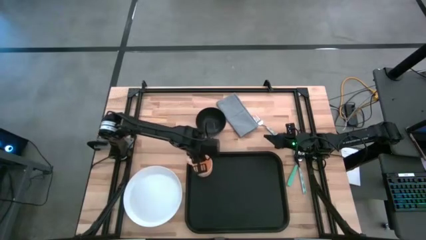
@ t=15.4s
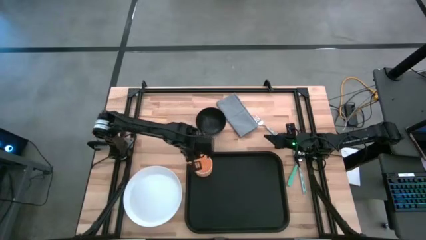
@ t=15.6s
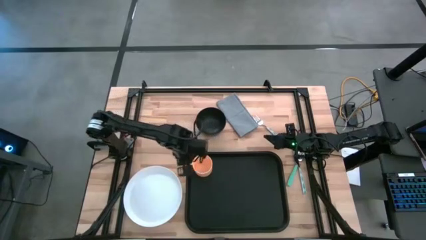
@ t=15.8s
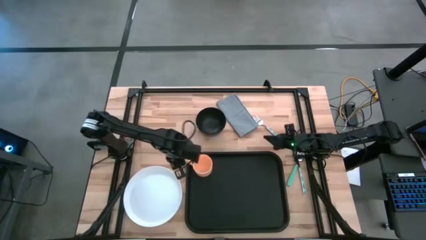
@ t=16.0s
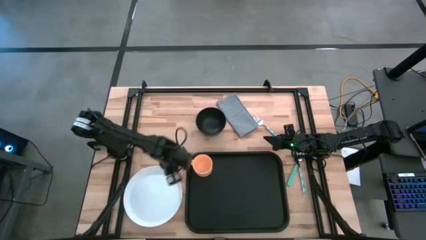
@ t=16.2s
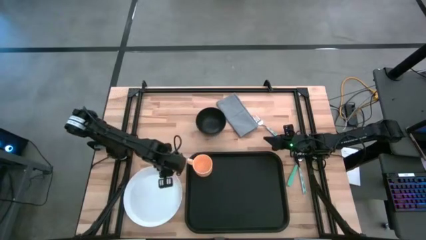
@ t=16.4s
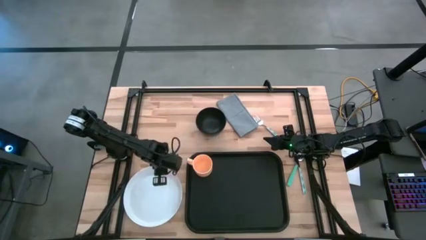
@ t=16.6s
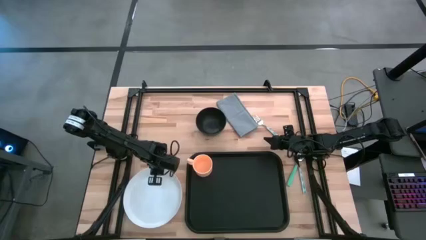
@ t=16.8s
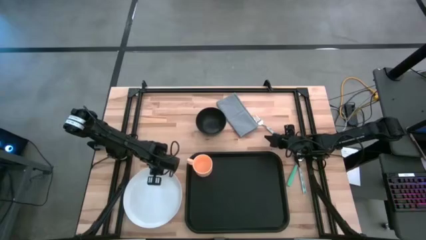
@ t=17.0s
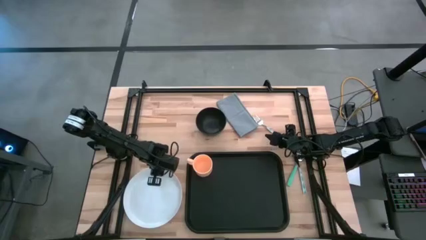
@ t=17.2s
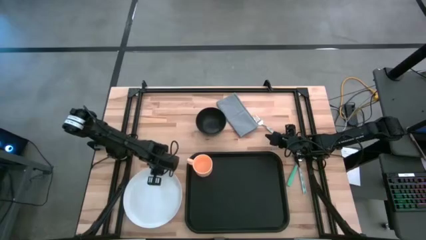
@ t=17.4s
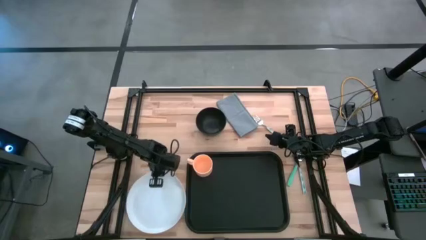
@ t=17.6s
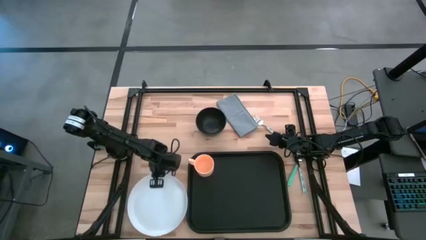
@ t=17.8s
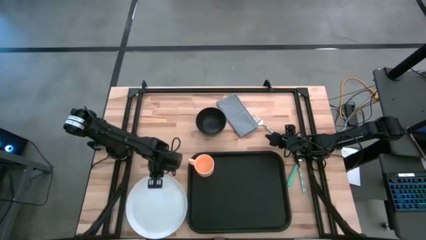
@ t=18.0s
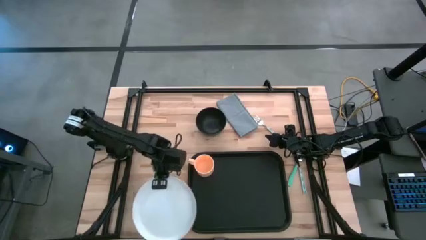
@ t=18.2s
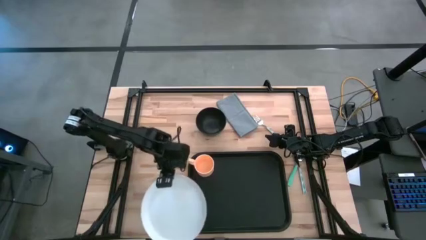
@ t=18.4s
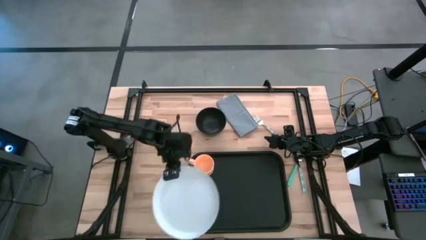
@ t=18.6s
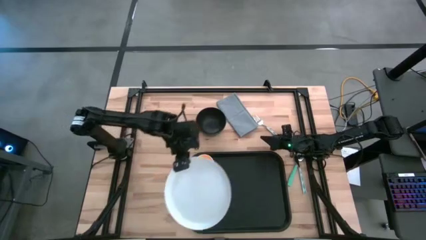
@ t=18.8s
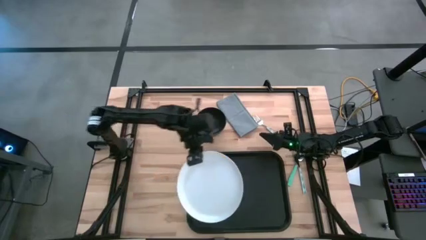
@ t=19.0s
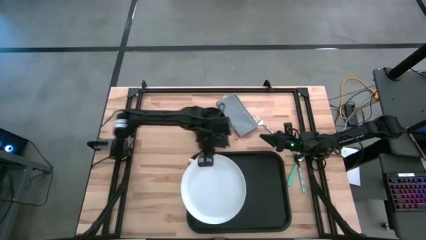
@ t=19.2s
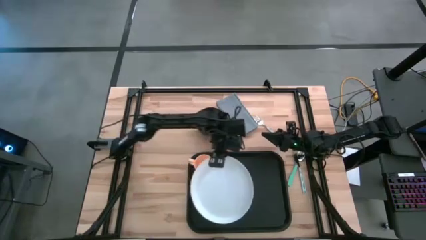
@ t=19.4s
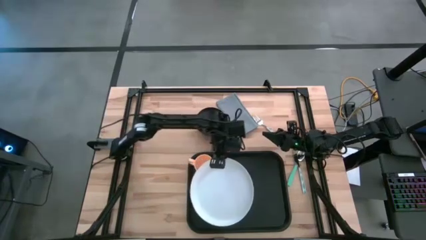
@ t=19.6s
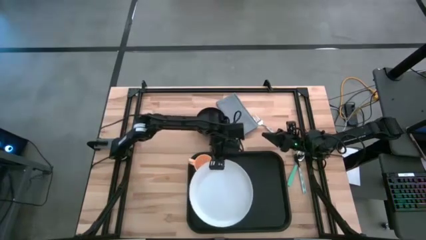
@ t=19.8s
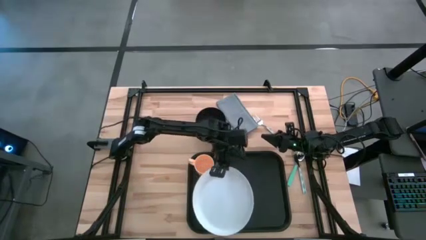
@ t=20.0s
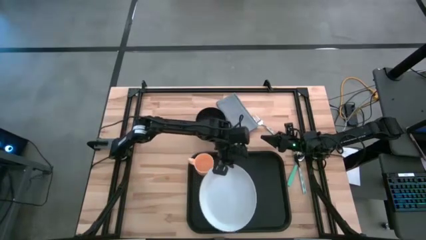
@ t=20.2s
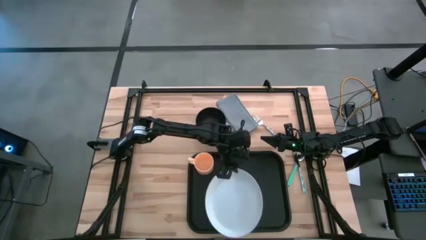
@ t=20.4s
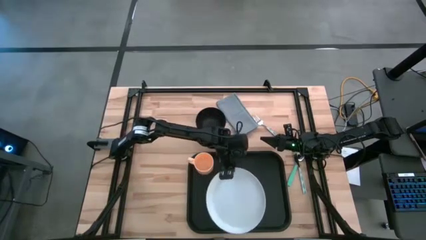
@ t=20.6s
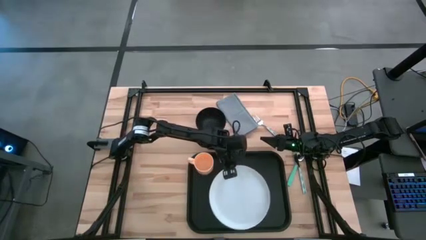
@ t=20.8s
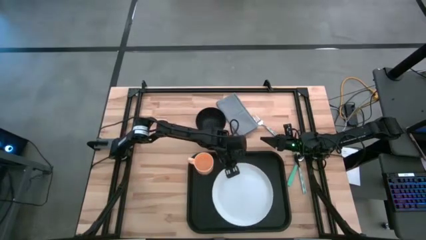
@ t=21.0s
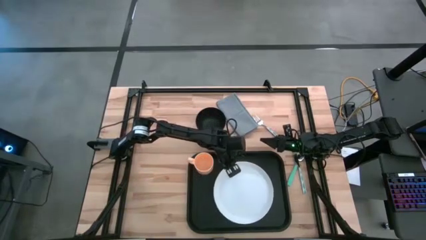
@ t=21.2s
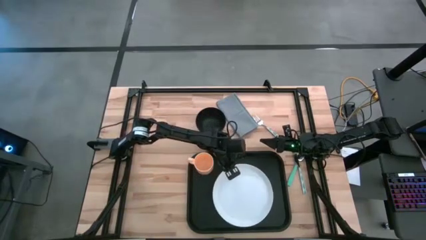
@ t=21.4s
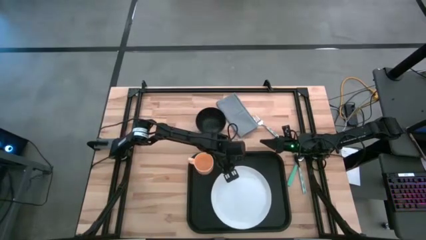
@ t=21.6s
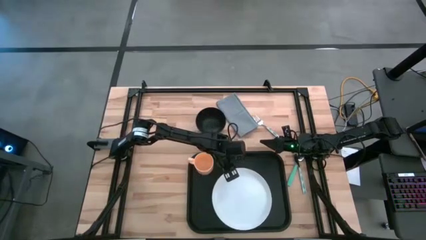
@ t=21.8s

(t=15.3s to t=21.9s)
Task: Set up tray
Put the white plate on the black tray

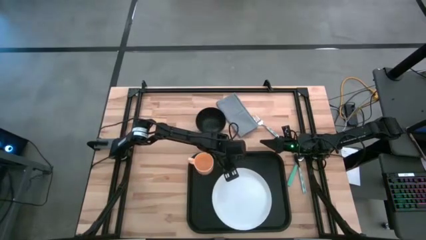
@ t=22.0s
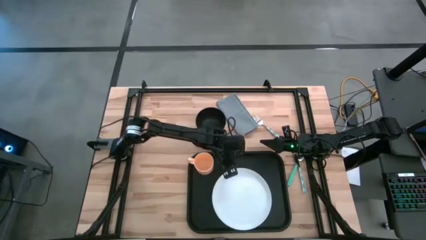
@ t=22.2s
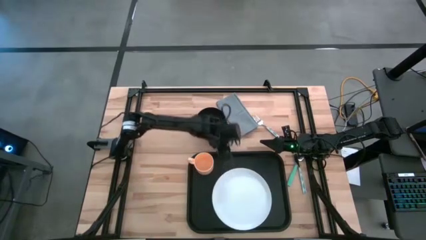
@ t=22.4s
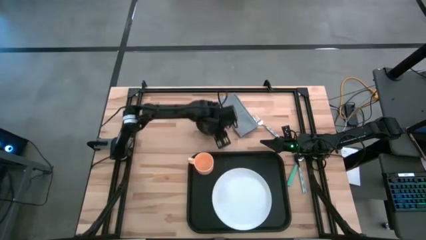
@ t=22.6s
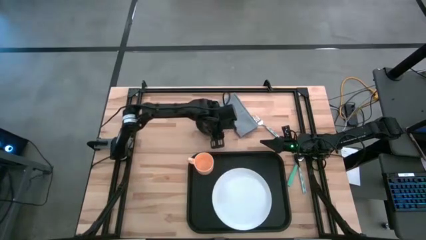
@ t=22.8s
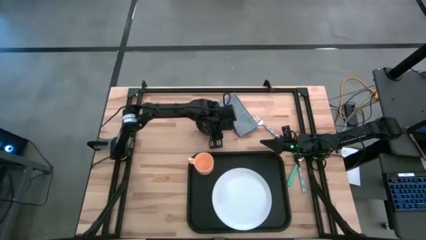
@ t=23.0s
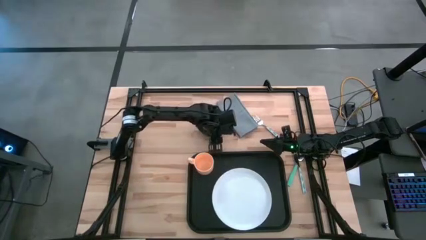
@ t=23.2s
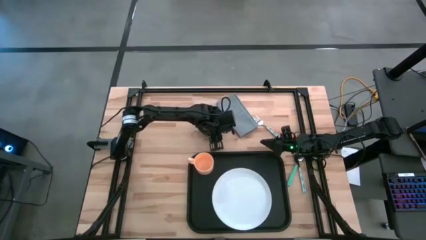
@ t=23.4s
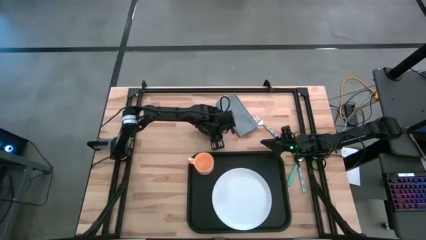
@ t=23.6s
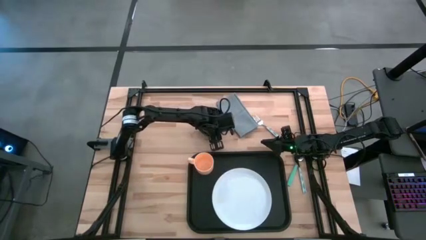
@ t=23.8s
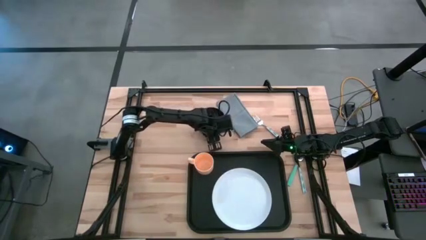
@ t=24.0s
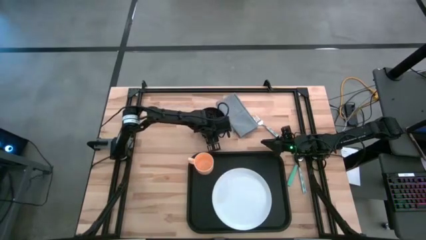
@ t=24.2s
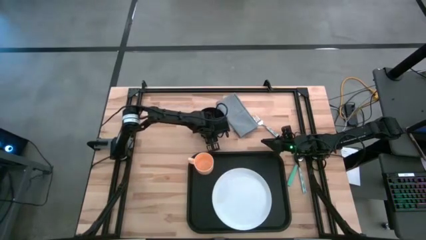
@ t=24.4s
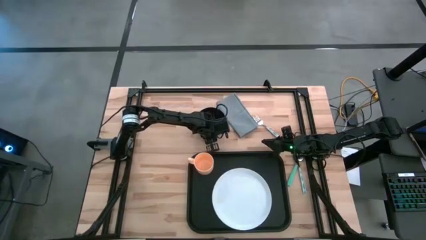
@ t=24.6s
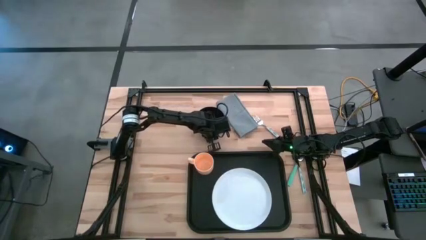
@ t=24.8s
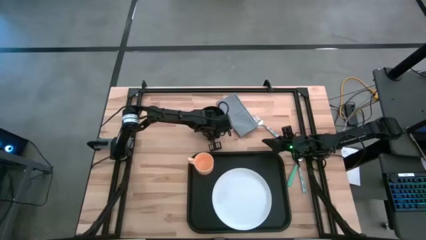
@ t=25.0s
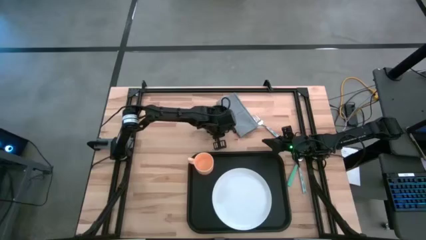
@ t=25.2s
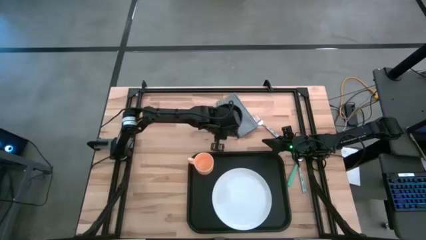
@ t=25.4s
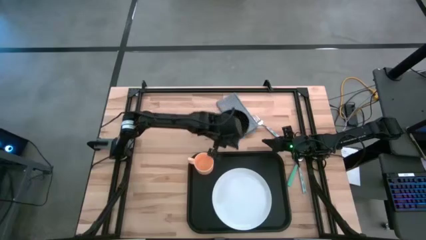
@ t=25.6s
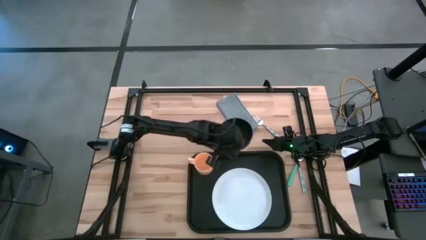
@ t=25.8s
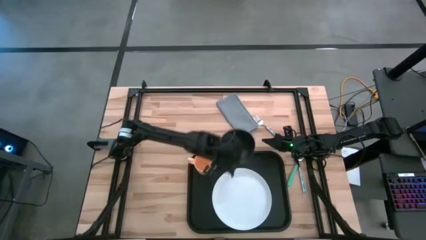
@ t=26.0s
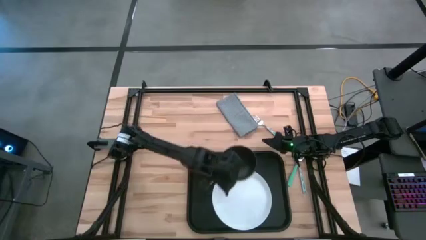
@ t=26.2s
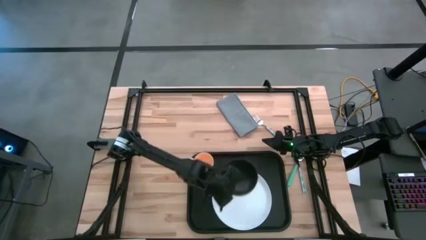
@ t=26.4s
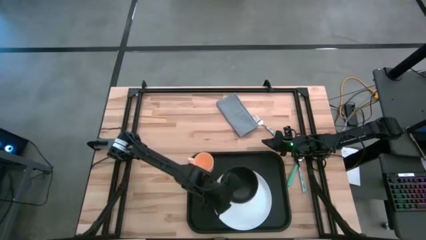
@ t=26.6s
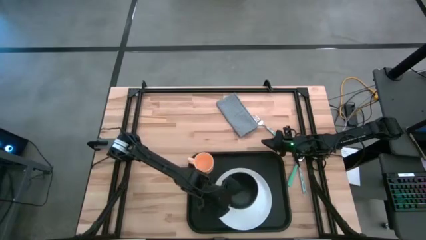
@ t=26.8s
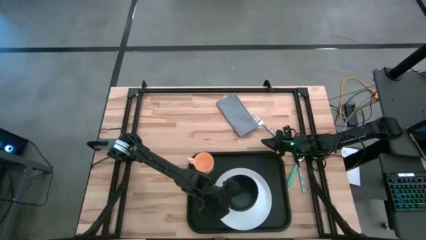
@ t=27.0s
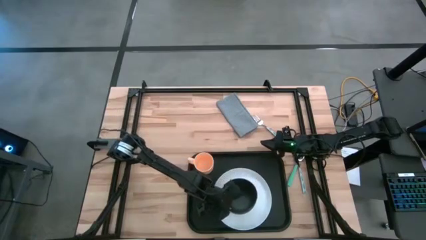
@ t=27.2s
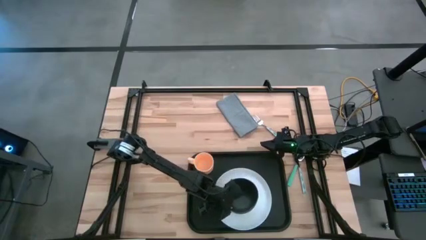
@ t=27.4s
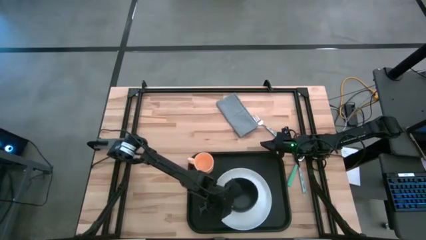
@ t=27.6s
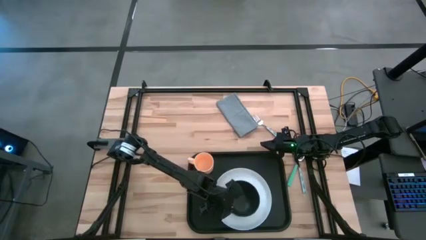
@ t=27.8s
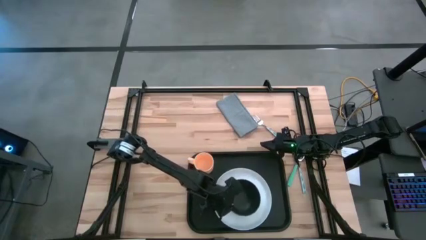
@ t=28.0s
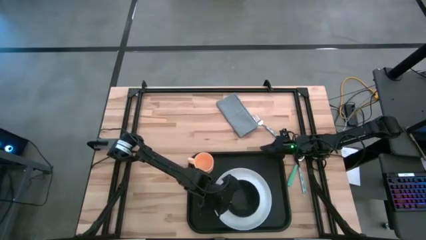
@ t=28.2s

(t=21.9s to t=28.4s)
Put the black bowl on the white plate

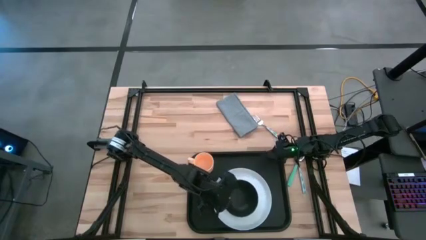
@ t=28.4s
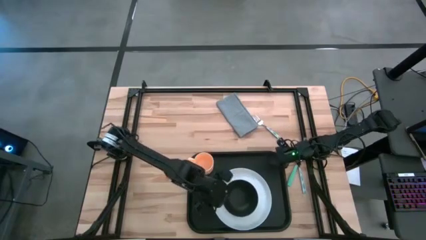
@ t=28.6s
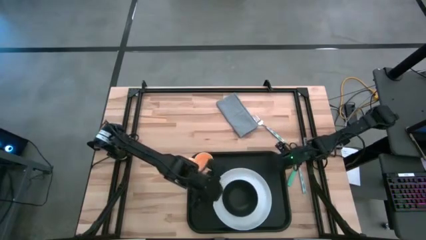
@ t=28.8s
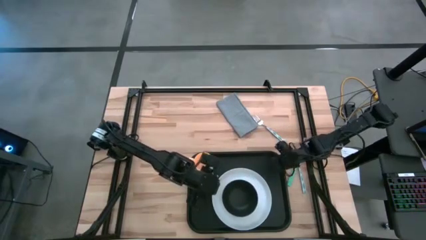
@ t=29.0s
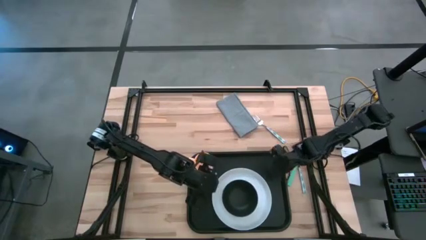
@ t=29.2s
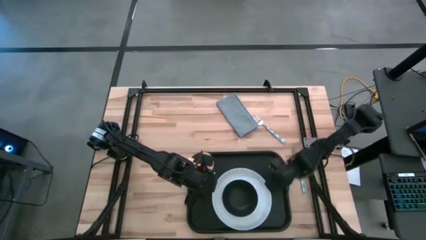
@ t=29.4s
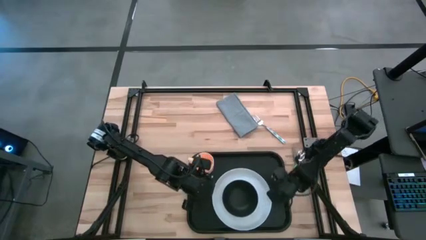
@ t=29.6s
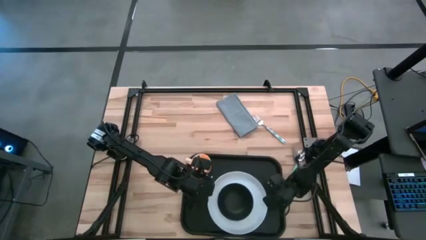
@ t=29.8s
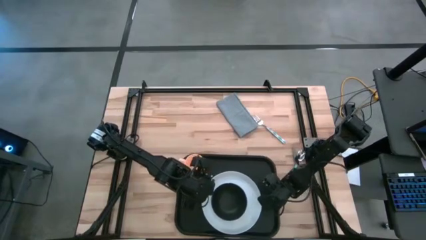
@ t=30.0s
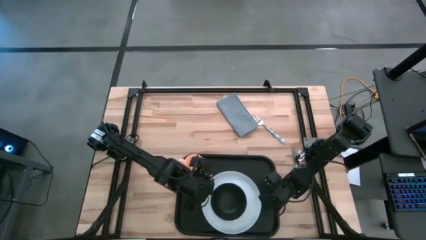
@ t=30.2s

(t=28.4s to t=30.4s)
Adjust the black tray

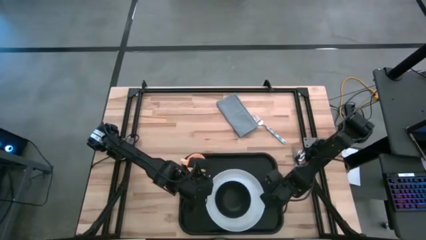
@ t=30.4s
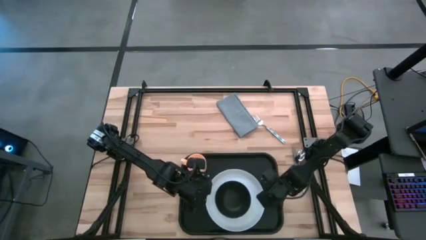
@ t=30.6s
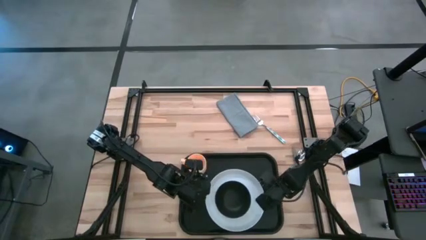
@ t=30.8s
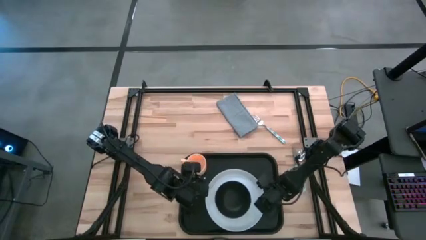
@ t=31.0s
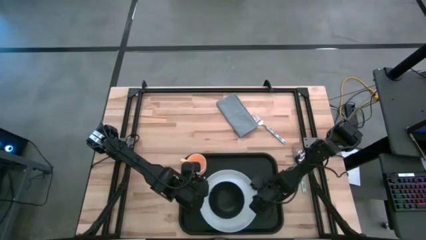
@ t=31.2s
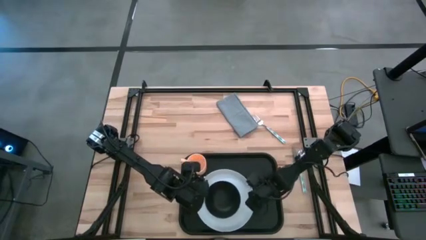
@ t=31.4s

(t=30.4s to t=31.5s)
Adjust the white plate on the black tray
